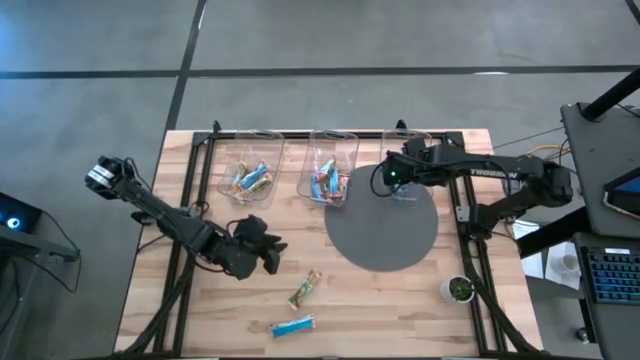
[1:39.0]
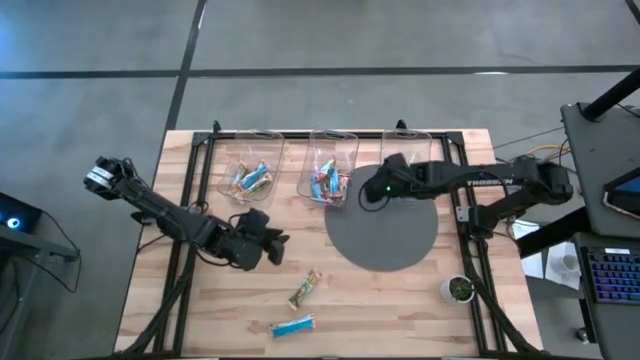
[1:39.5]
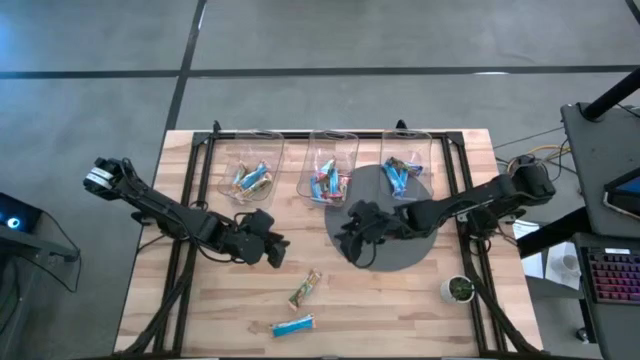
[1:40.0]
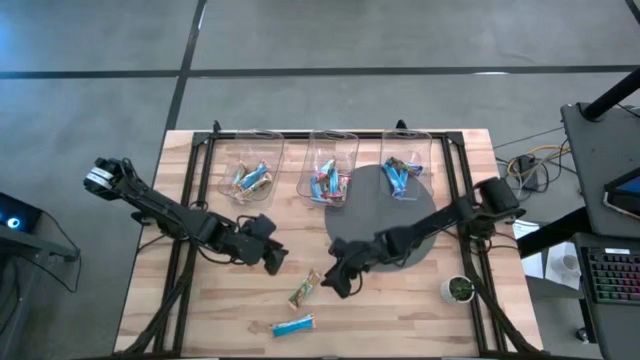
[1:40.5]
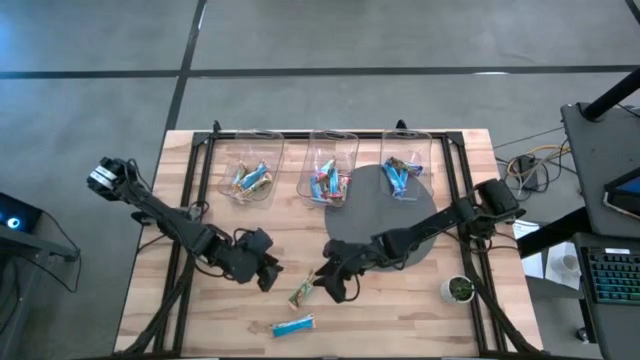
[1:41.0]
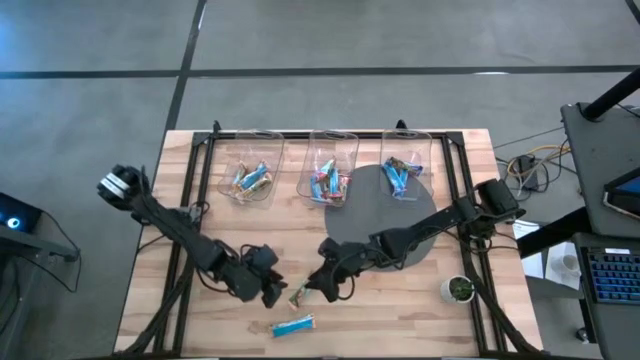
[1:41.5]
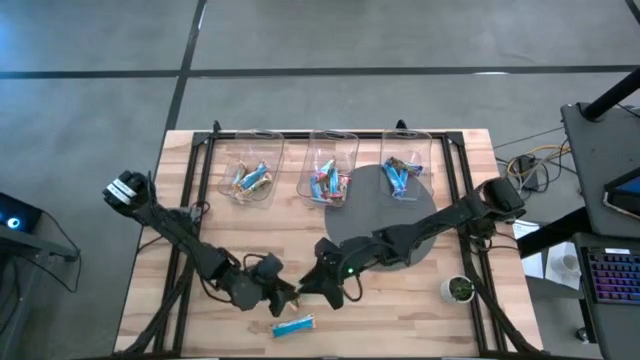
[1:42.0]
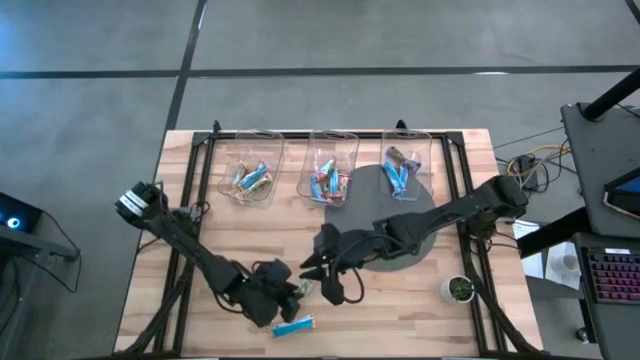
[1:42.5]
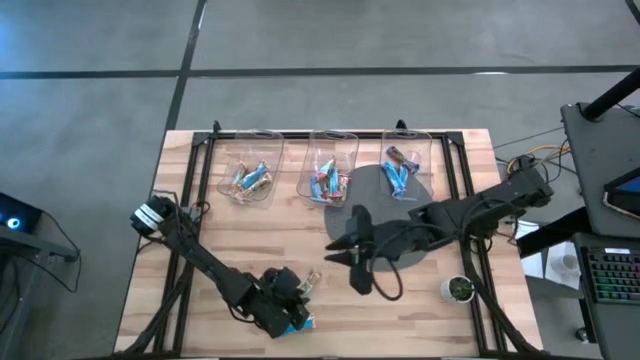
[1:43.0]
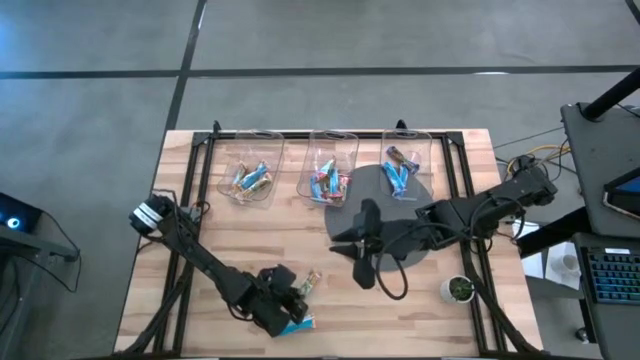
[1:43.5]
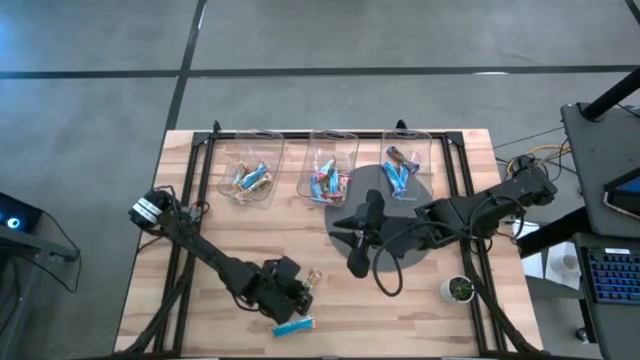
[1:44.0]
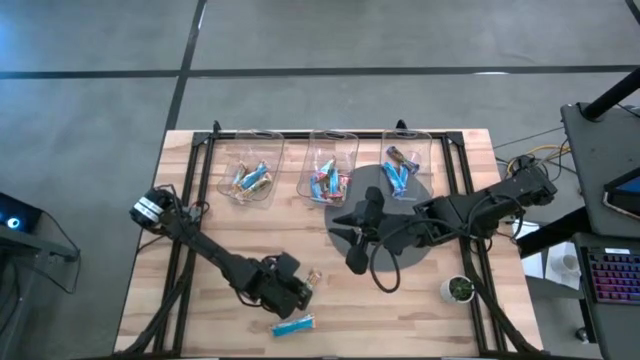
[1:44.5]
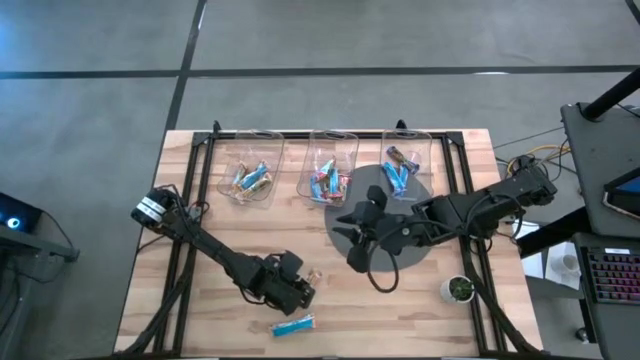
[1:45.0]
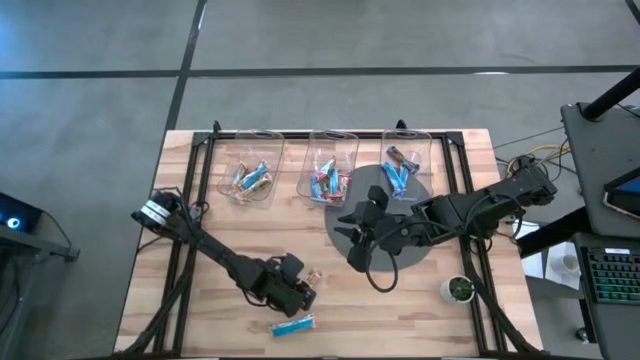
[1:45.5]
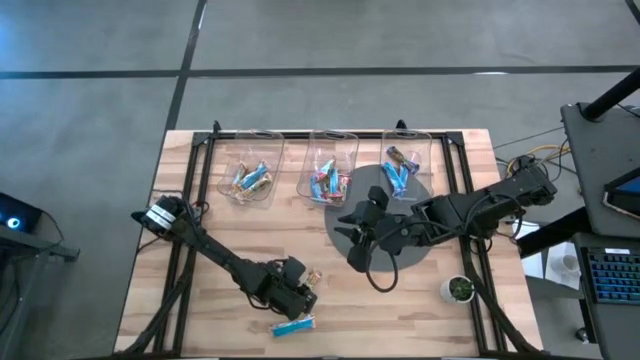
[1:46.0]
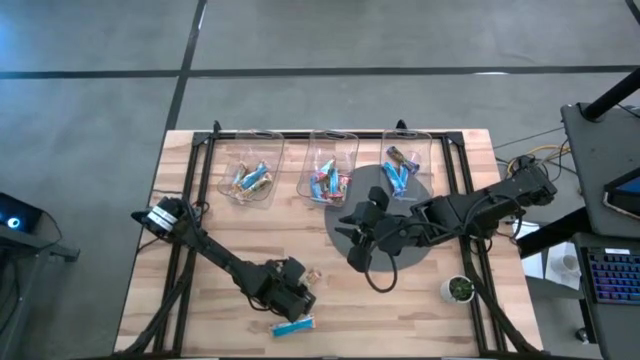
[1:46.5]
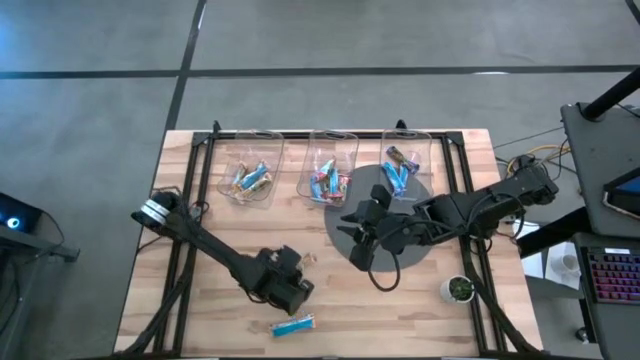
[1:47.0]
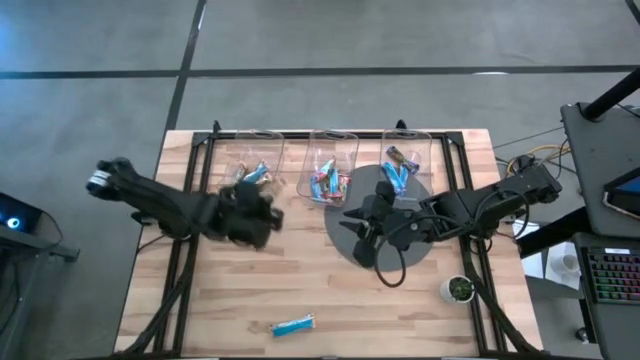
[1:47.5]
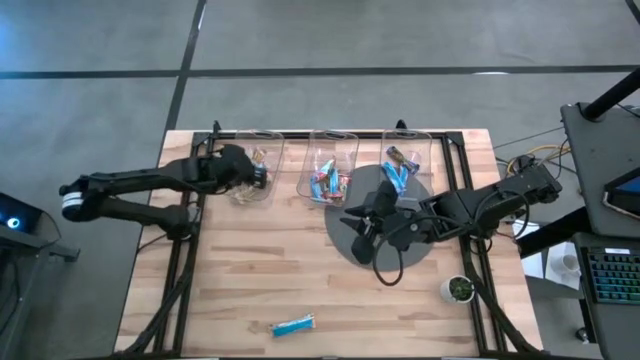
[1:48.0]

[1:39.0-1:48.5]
Task: Pick and place Granola Bars by type
Put the yellow granola bar into the left transparent bin

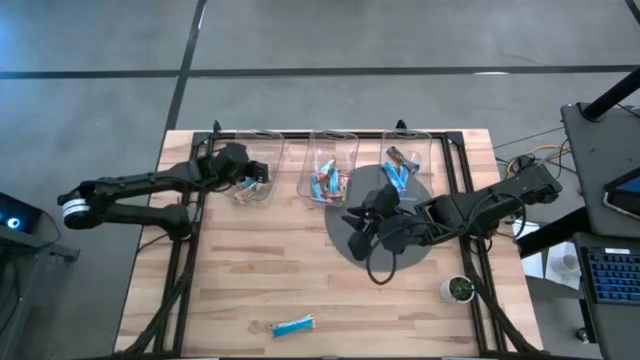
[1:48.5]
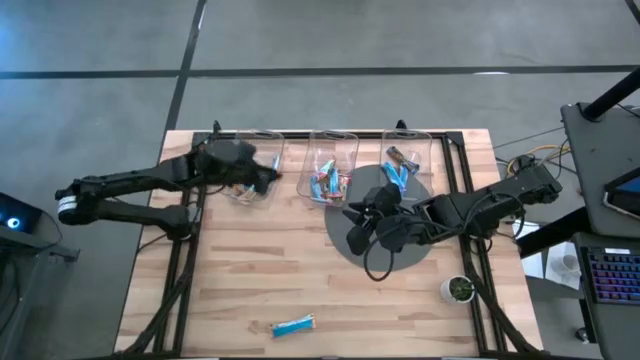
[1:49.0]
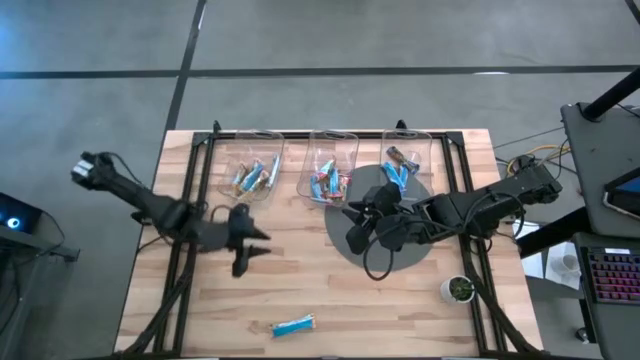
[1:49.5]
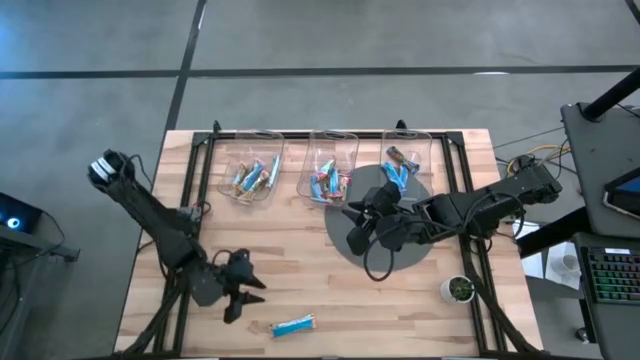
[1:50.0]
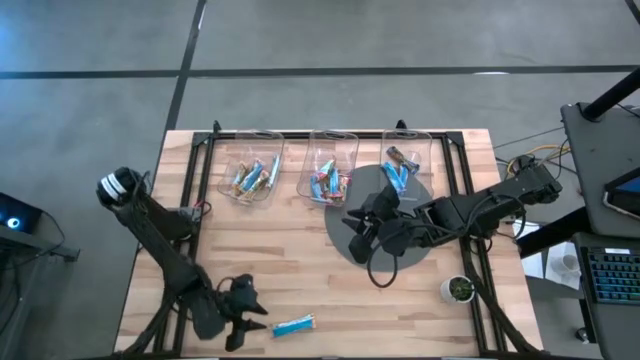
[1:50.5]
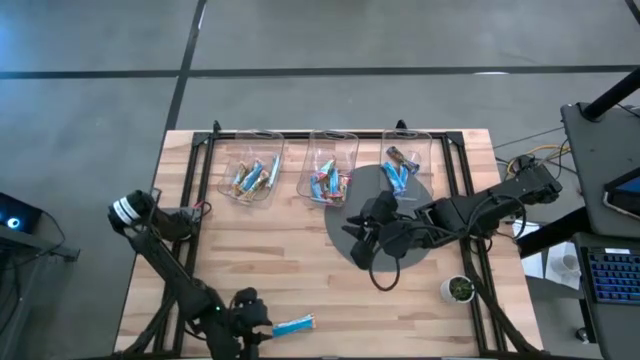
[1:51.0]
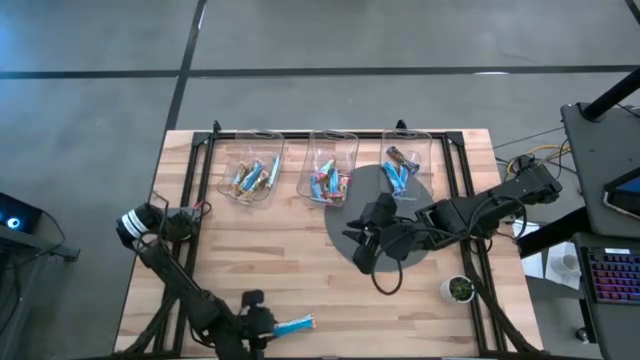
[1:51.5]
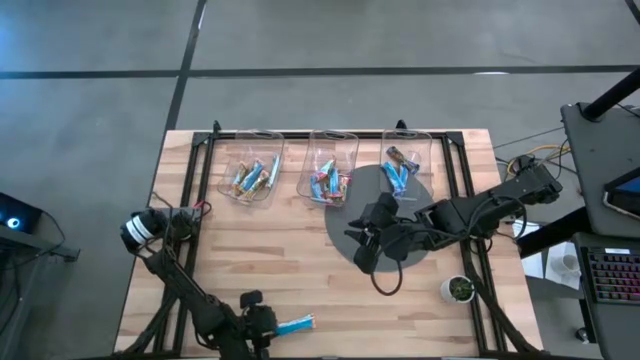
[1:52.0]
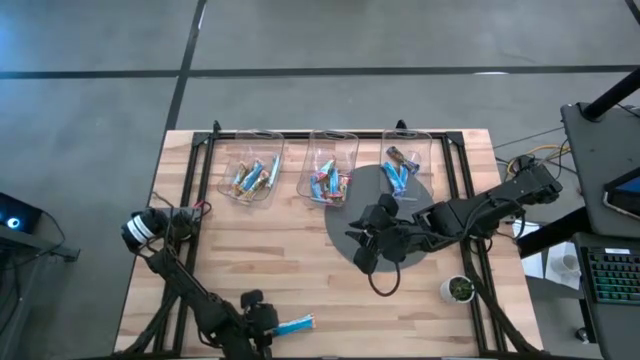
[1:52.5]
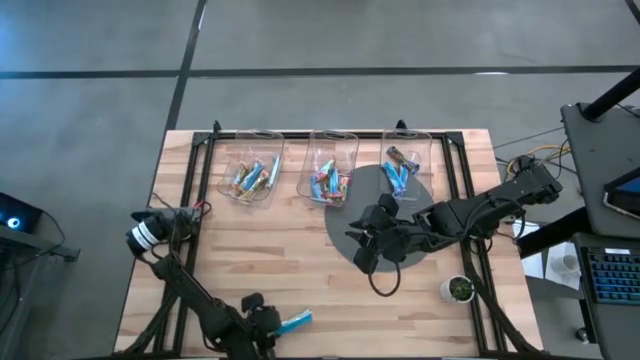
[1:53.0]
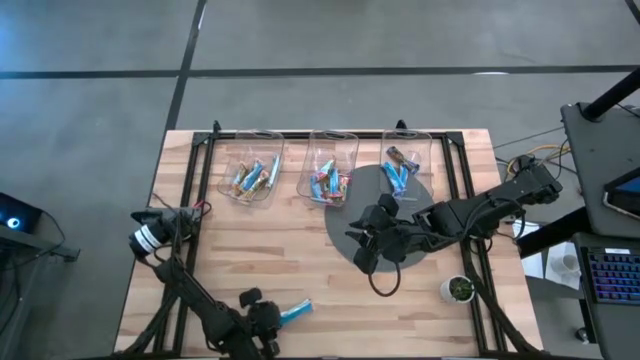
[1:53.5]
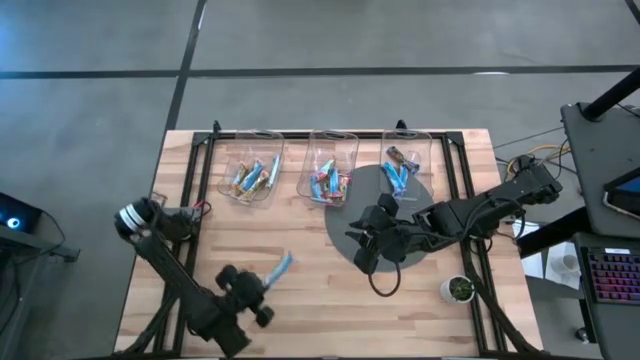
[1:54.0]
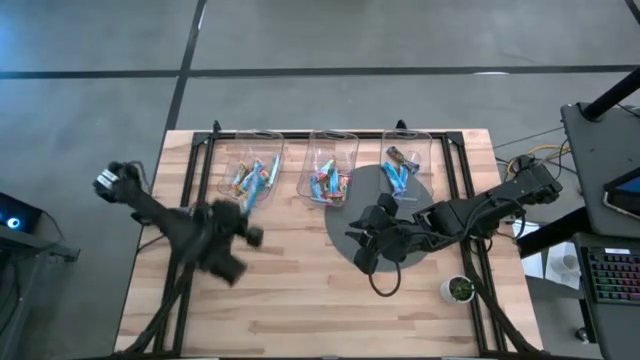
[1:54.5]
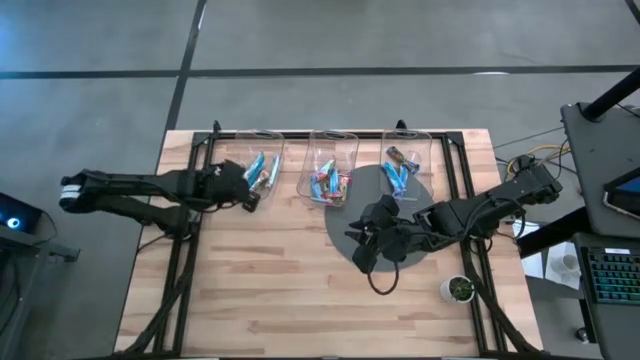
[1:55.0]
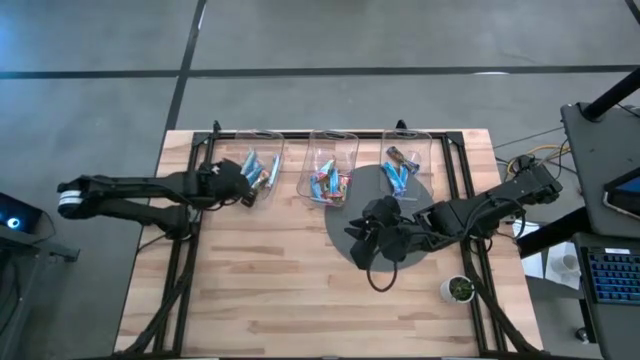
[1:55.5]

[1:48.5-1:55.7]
Put the yellow granola bar into the left transparent bin

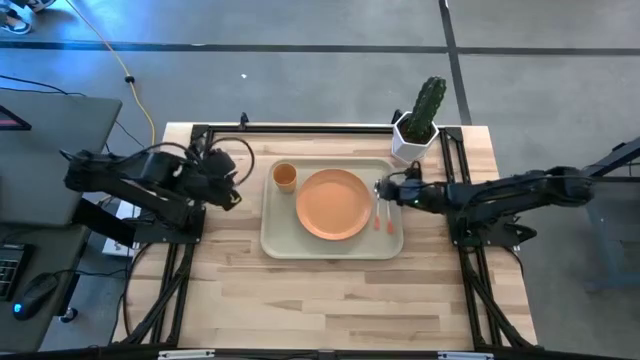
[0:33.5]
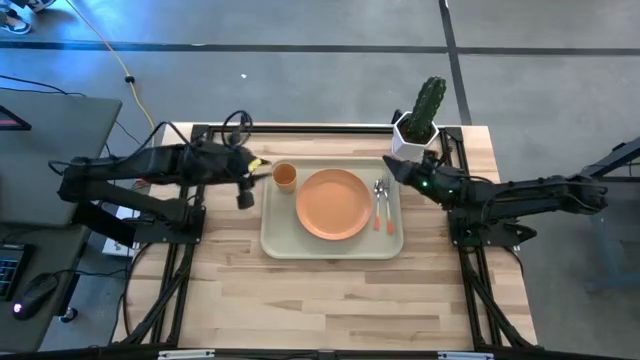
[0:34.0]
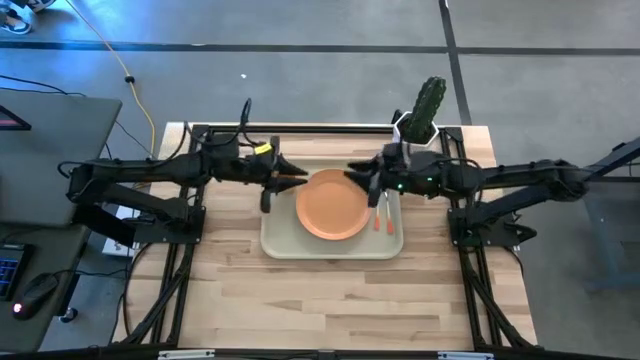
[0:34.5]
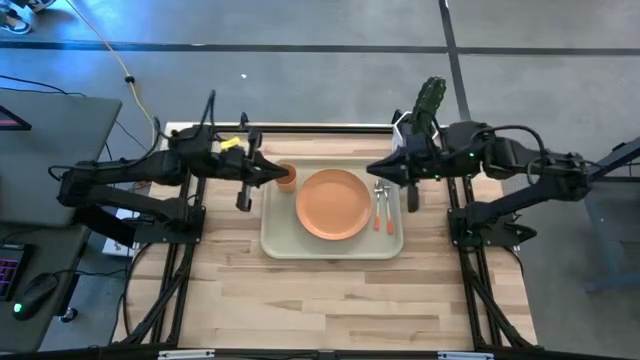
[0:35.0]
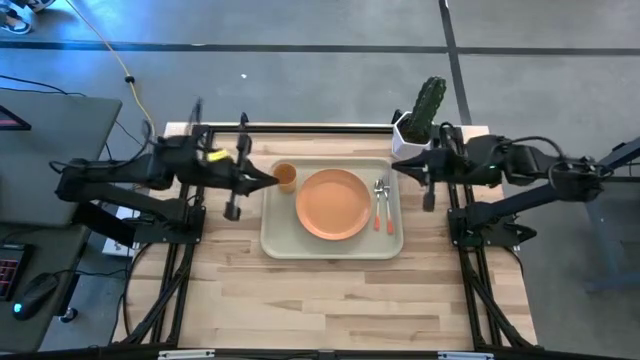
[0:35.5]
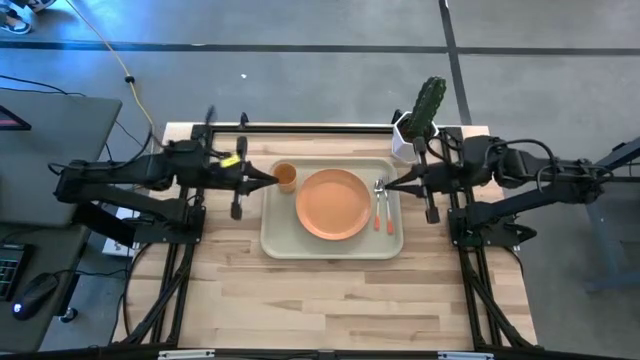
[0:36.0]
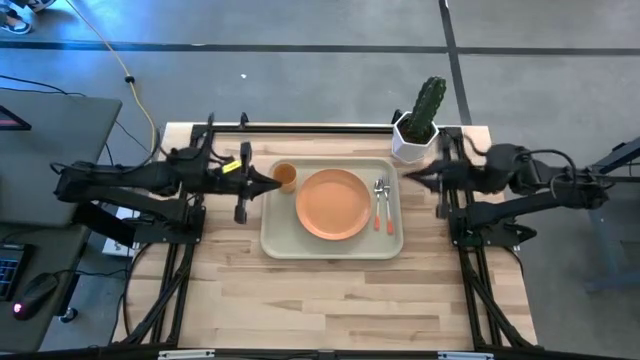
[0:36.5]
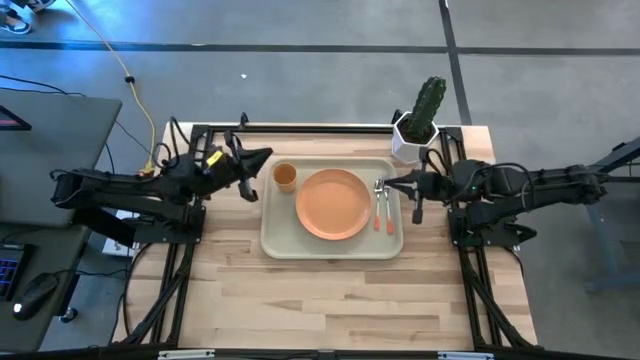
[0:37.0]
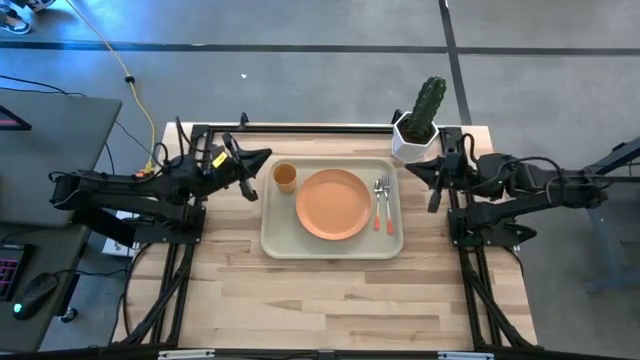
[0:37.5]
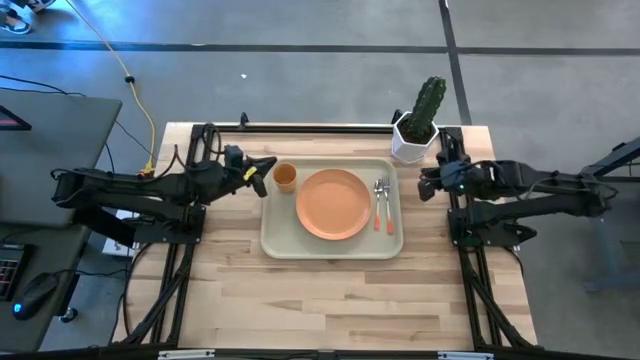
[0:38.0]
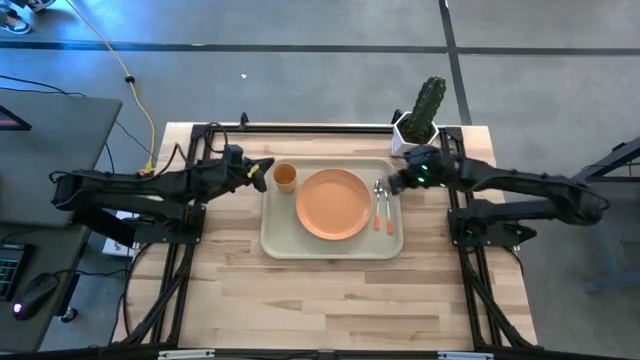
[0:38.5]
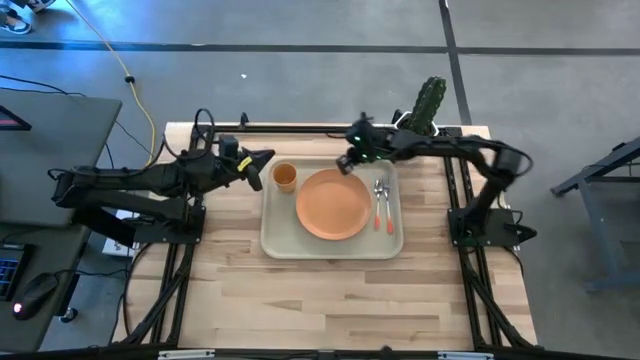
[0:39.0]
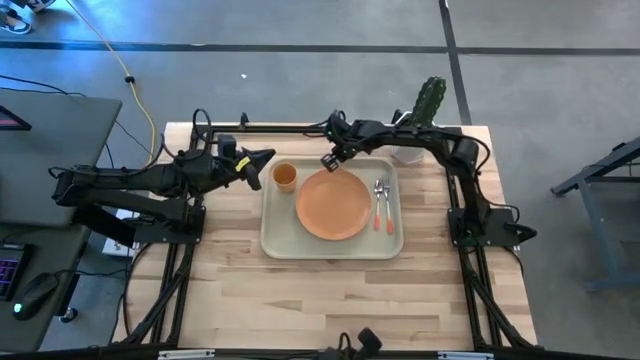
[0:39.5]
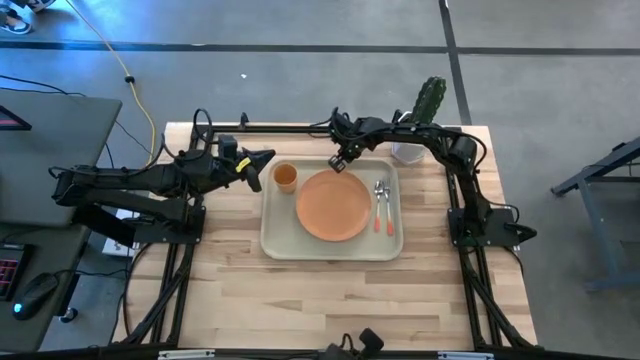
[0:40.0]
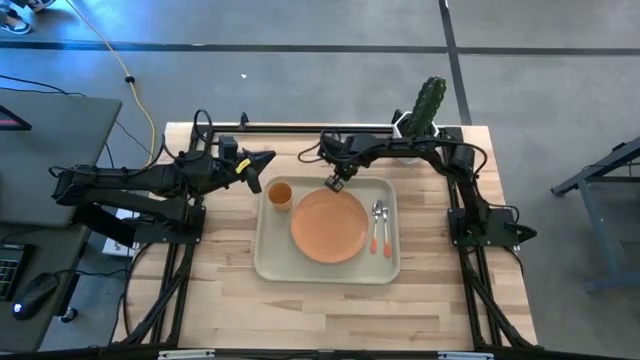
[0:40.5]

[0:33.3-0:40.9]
Task: Pick and place plate/cup/fork/spoon on tray
Adjust the light brown tray
